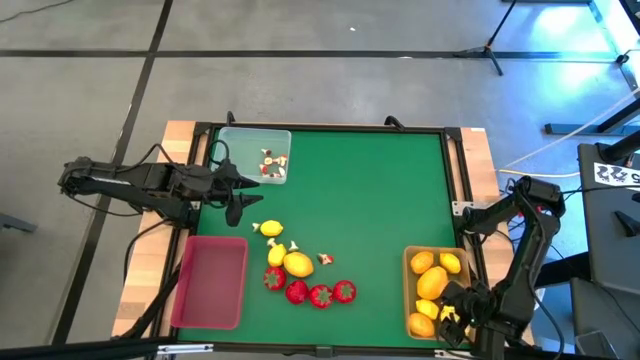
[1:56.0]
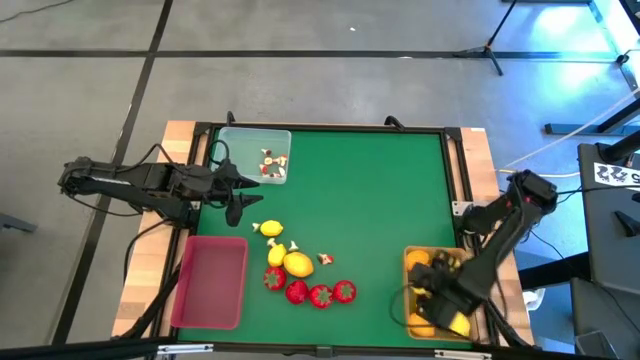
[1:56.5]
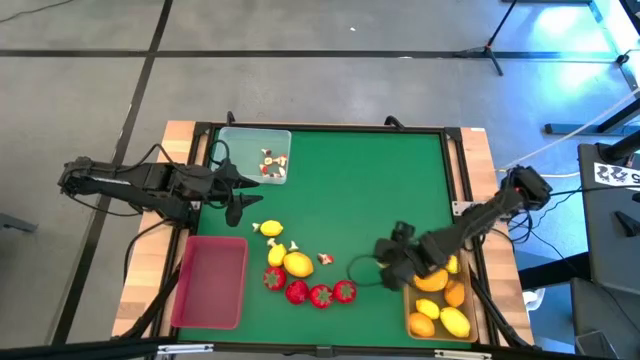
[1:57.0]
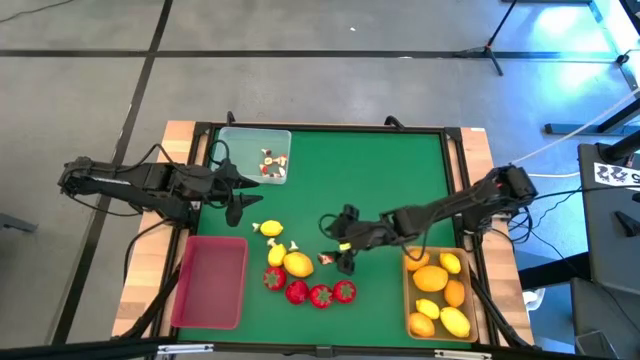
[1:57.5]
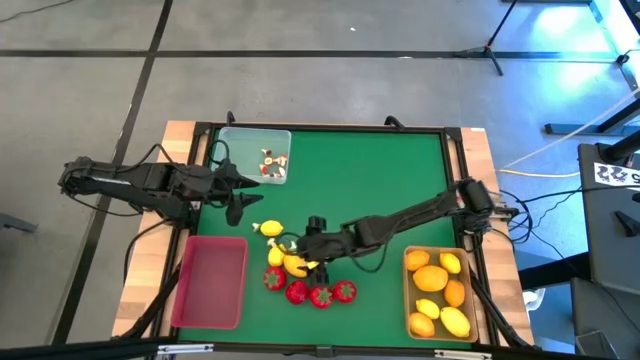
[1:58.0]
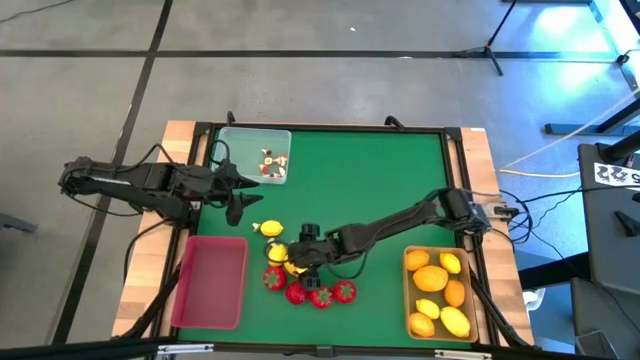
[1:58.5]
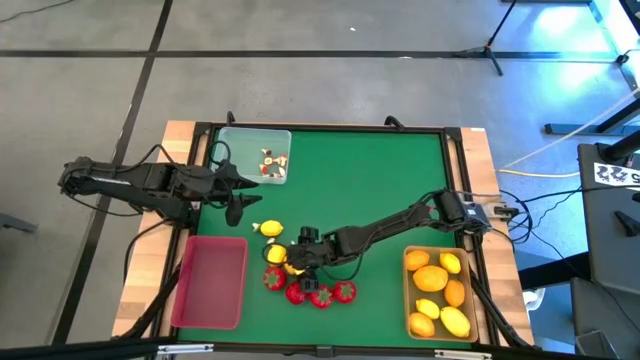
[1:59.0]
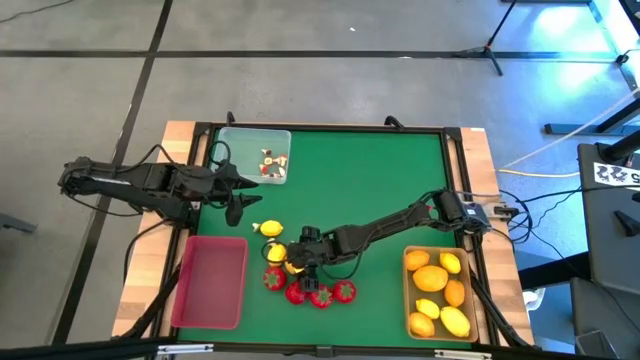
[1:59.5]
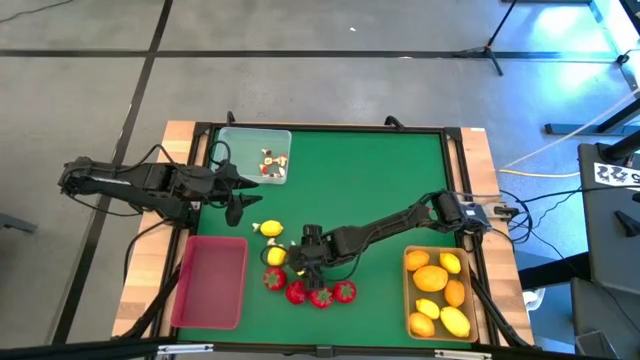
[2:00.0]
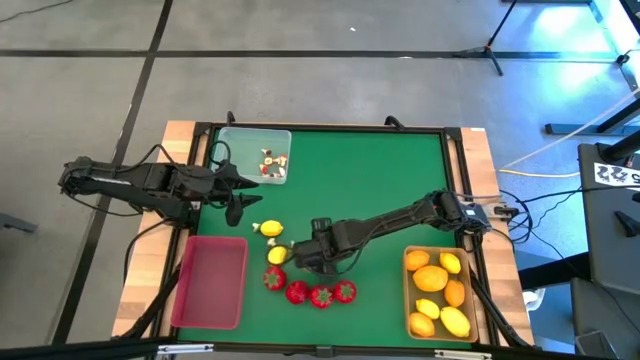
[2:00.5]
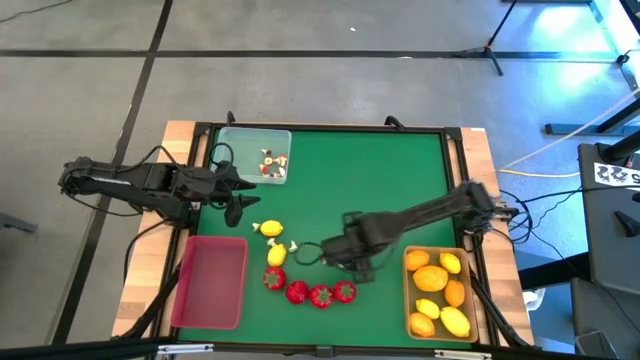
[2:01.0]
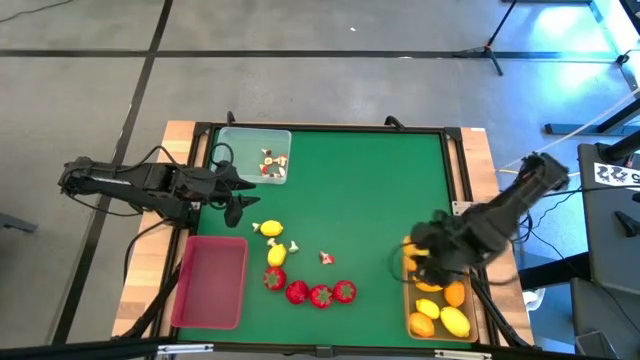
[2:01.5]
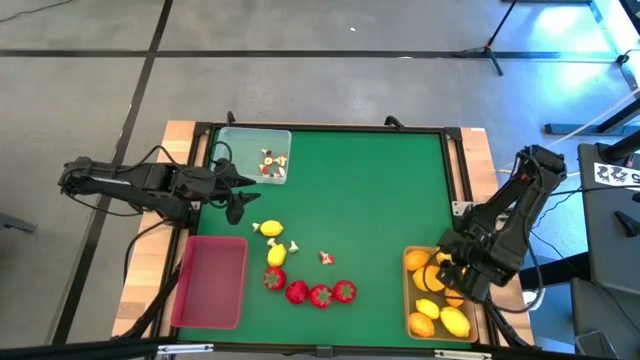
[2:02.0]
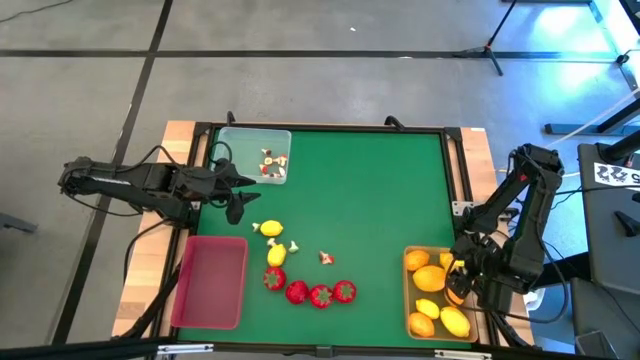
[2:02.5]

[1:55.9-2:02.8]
Task: Sort produce into baskets
Put the lemon into the orange bin

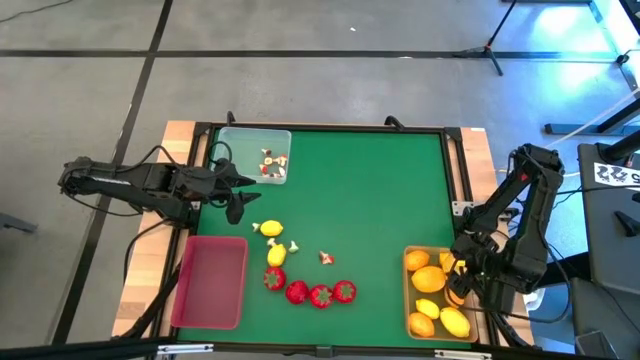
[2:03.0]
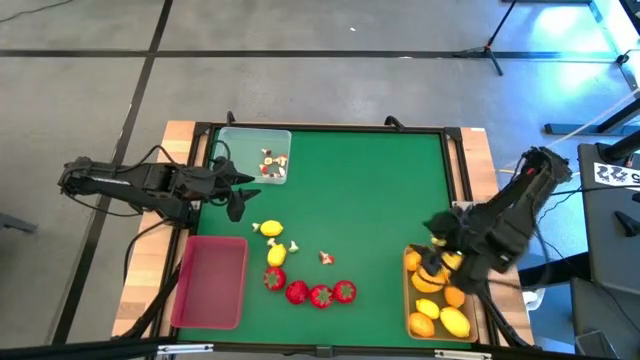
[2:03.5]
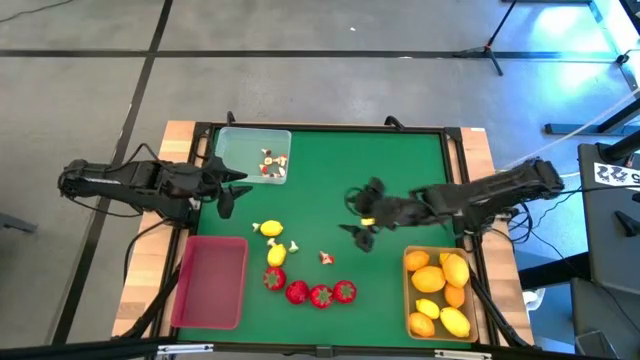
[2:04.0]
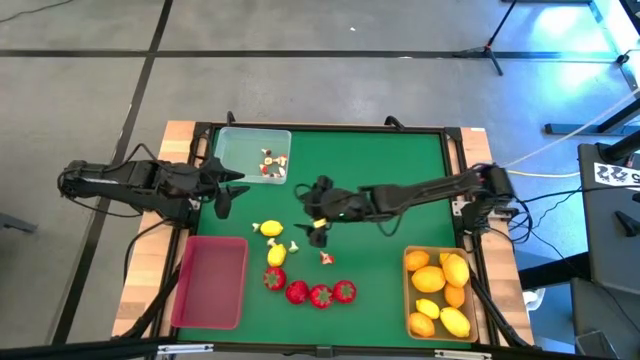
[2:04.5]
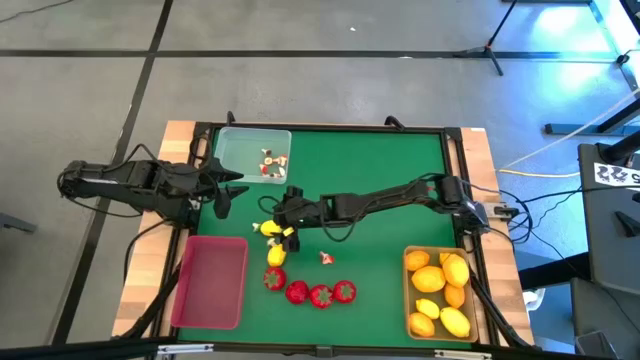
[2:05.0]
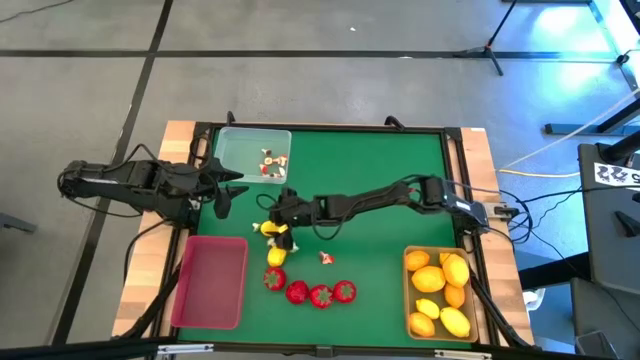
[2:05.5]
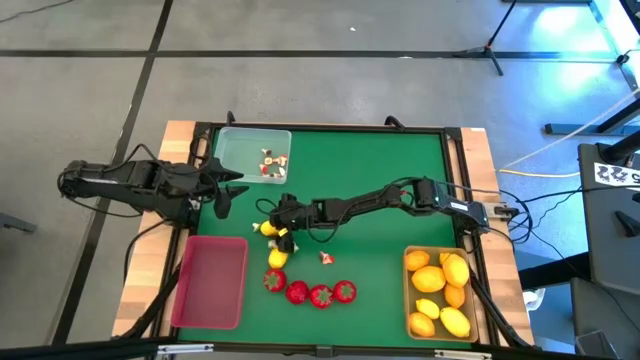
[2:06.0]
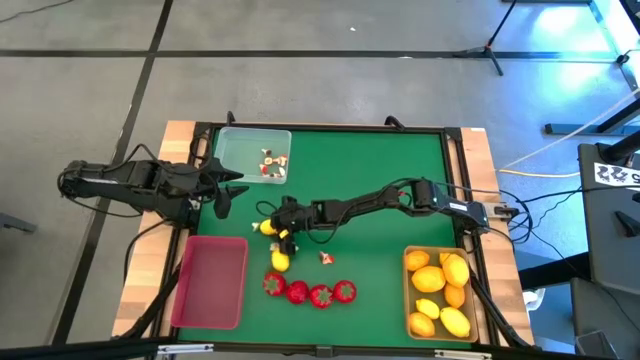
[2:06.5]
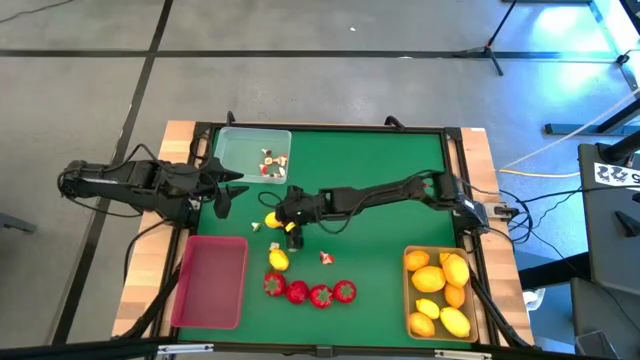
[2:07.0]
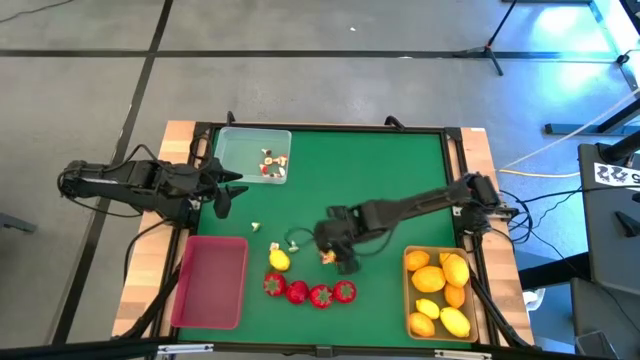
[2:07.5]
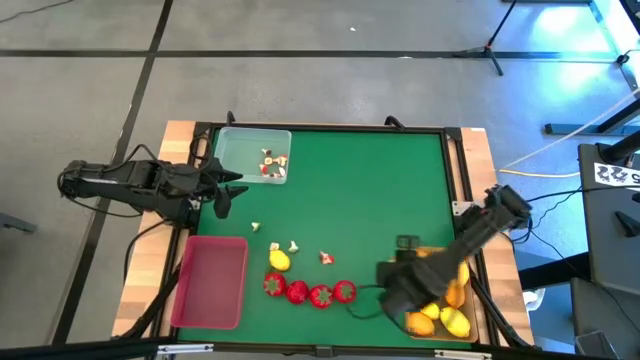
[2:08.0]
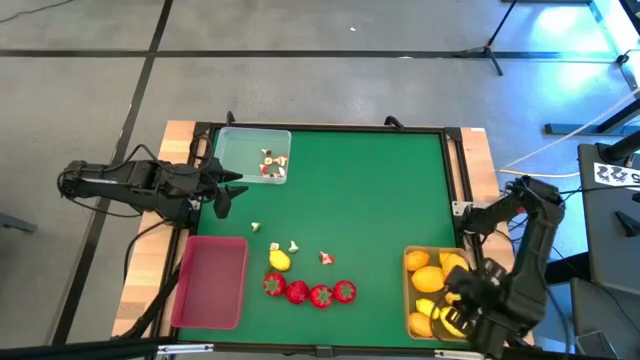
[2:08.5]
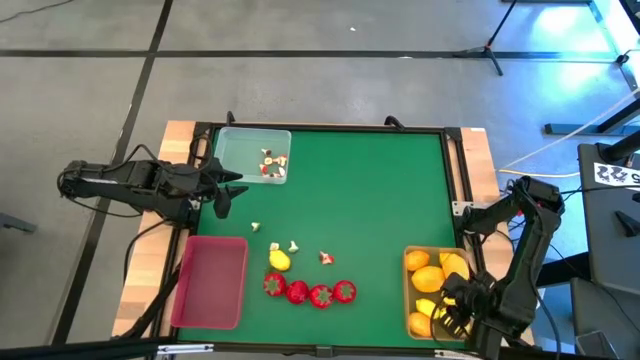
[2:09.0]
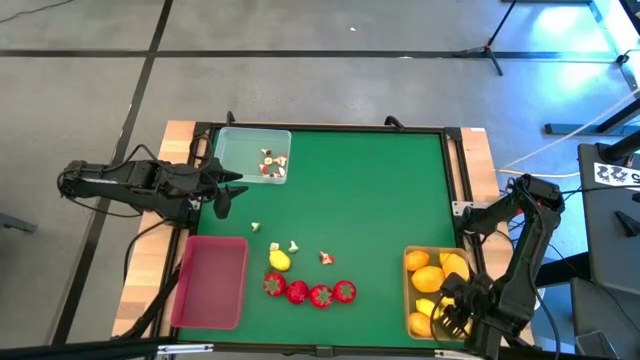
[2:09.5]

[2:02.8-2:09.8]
Put the lemon into the orange bin

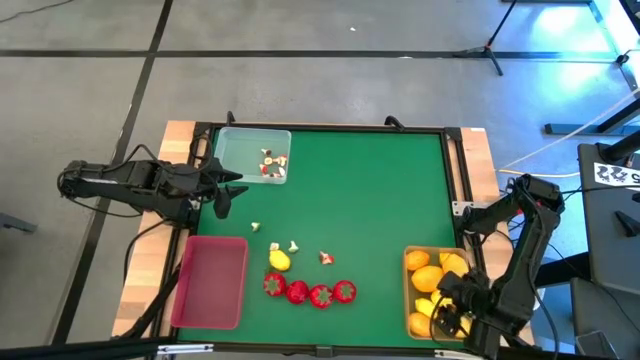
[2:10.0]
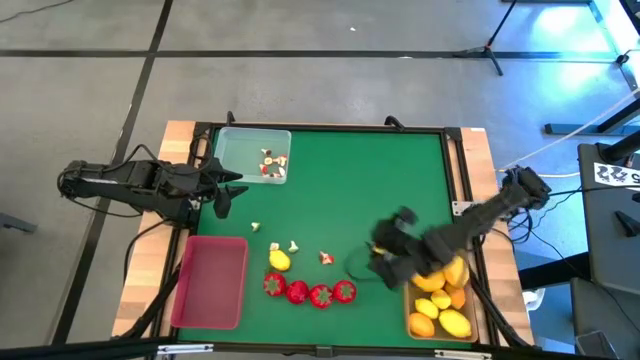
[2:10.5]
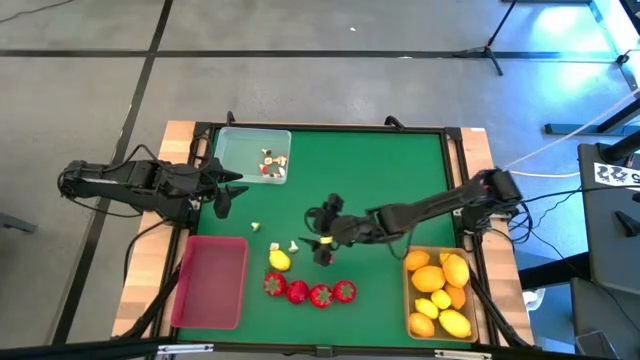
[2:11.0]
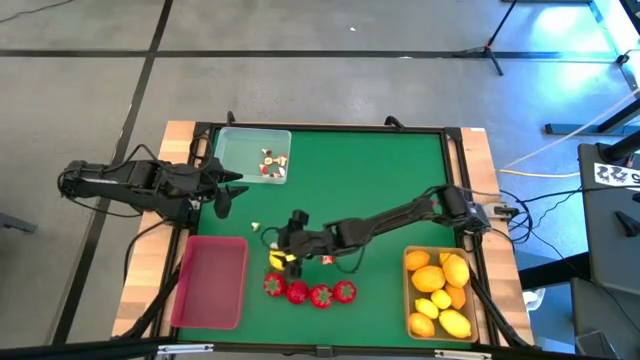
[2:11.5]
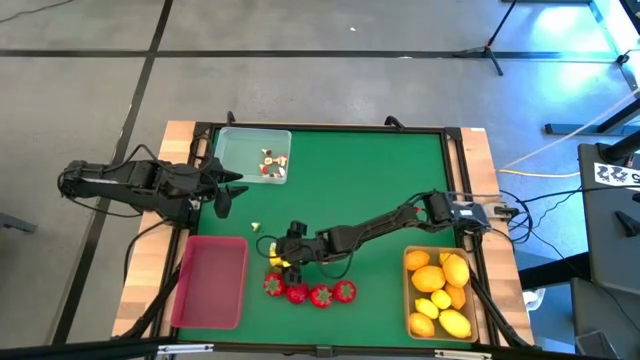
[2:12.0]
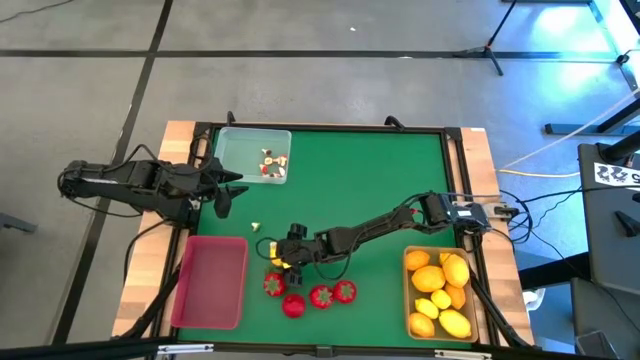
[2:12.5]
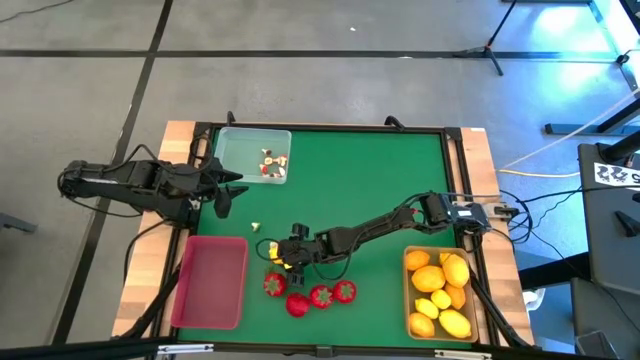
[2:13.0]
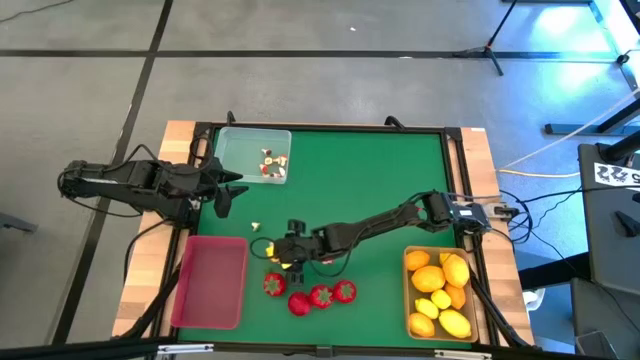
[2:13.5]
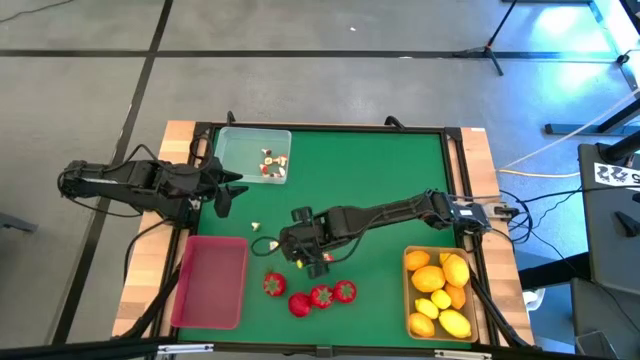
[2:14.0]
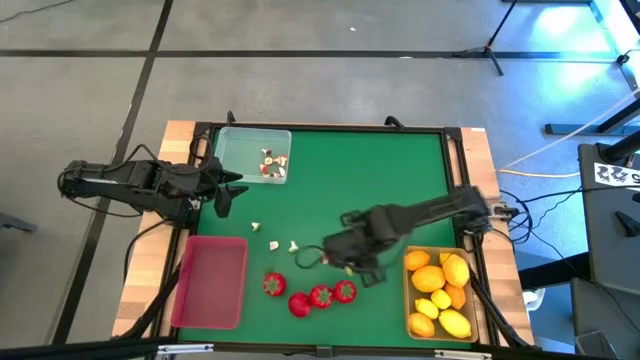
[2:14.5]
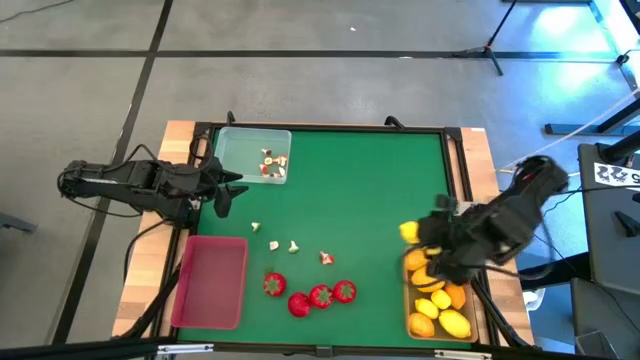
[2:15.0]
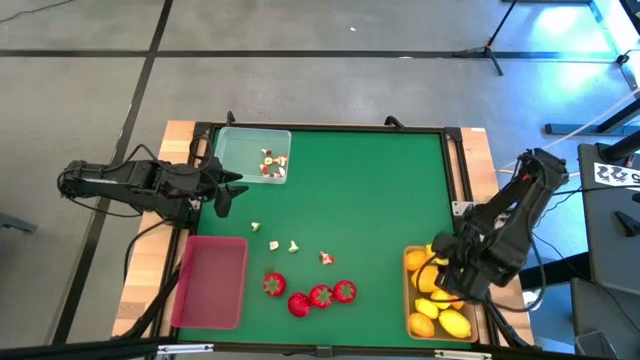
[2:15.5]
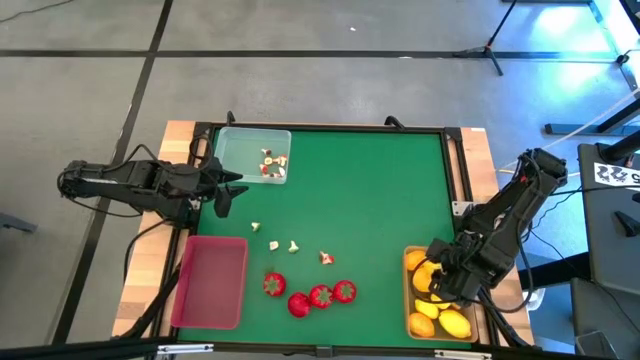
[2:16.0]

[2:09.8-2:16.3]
Put the lemon into the orange bin
